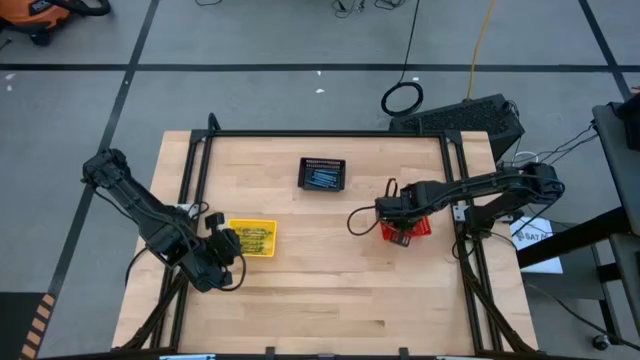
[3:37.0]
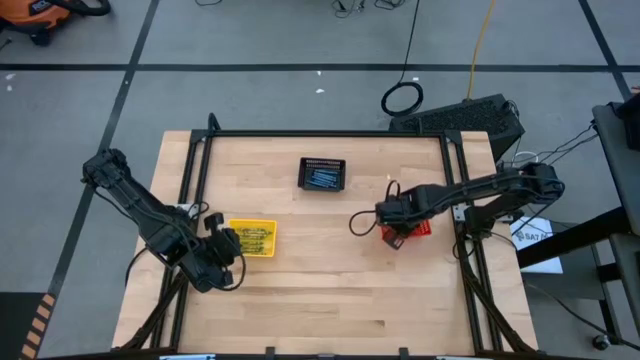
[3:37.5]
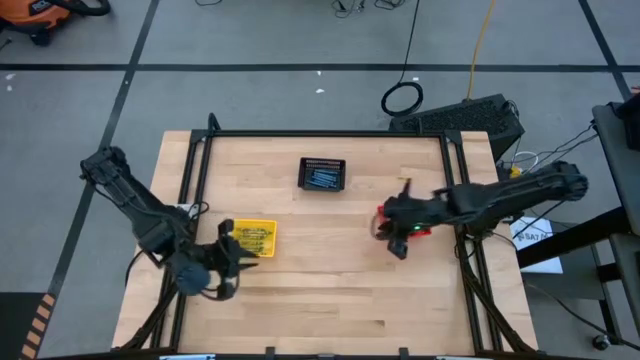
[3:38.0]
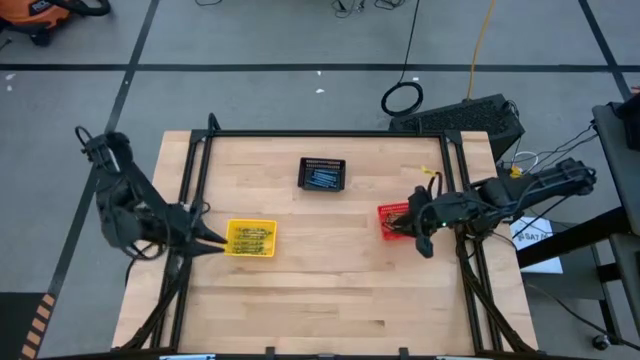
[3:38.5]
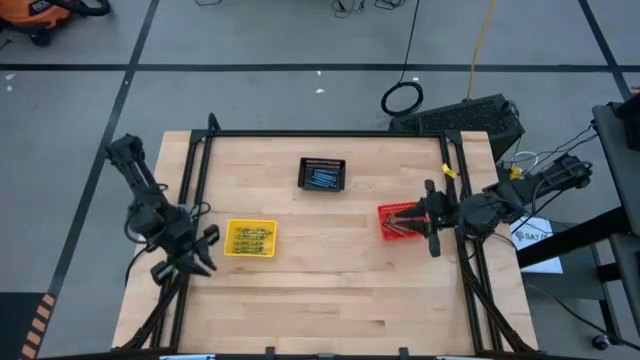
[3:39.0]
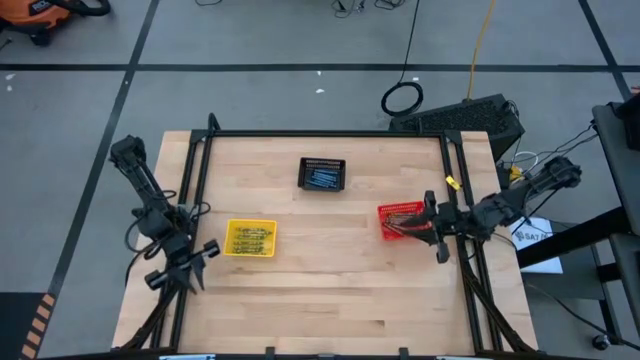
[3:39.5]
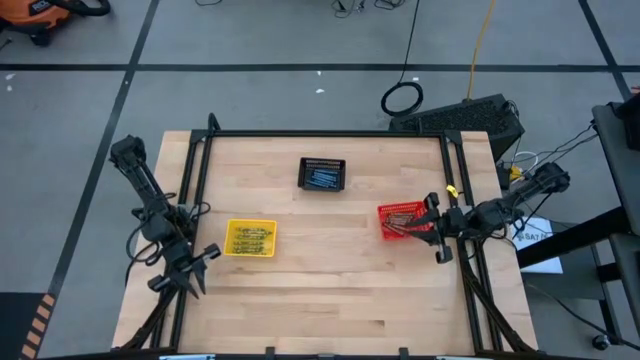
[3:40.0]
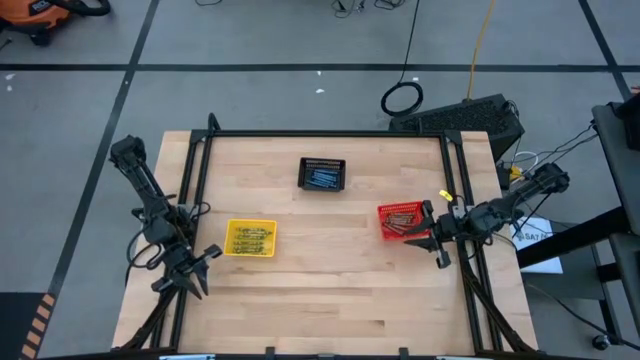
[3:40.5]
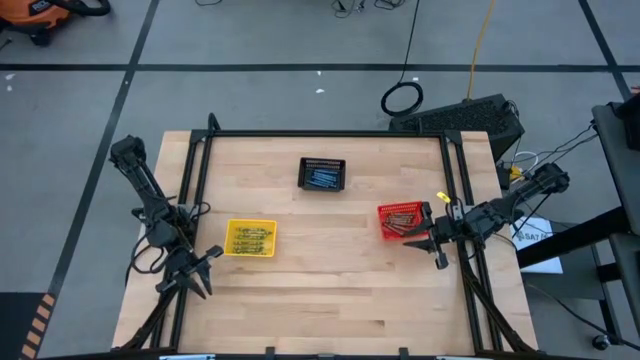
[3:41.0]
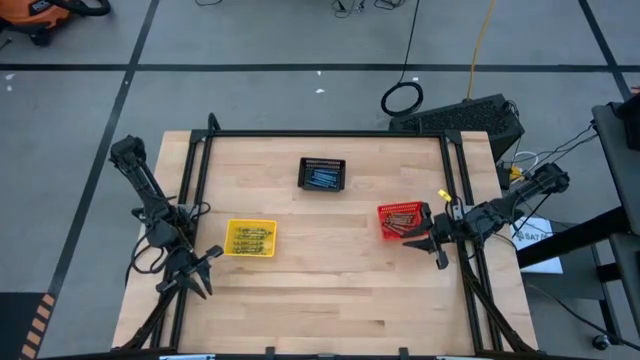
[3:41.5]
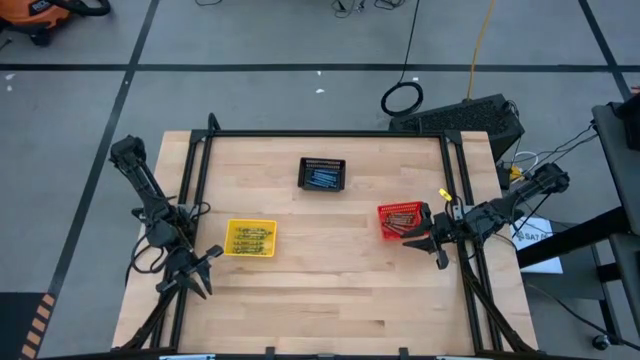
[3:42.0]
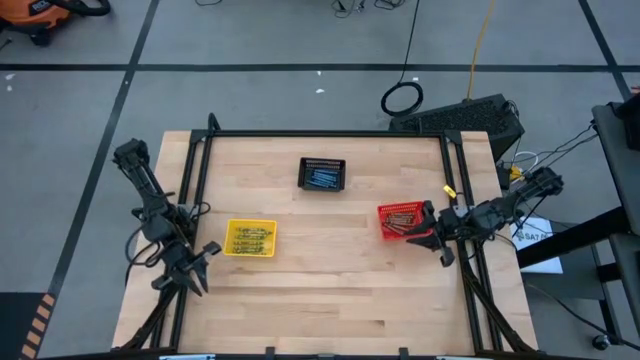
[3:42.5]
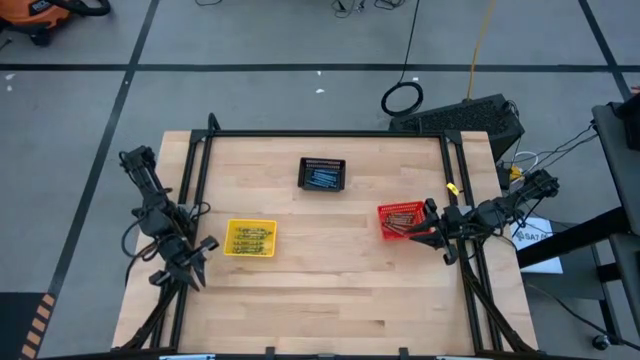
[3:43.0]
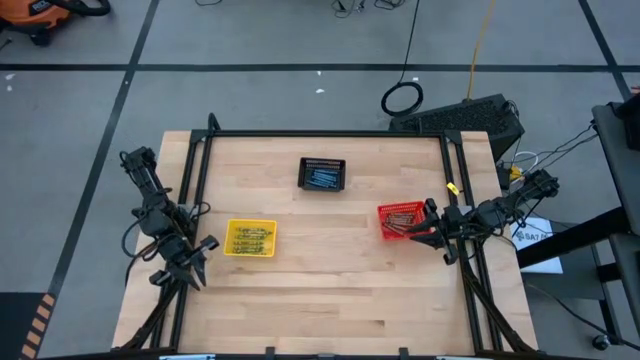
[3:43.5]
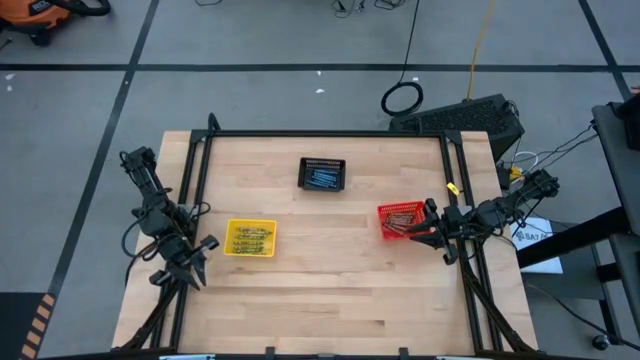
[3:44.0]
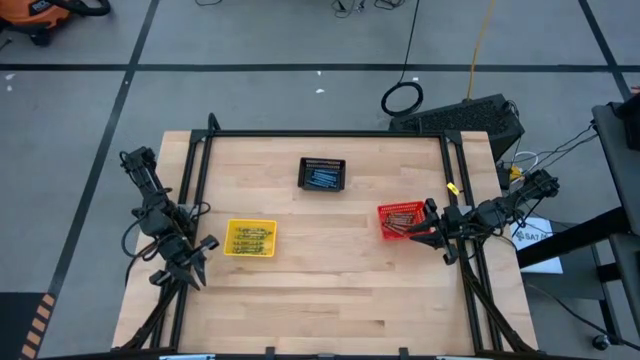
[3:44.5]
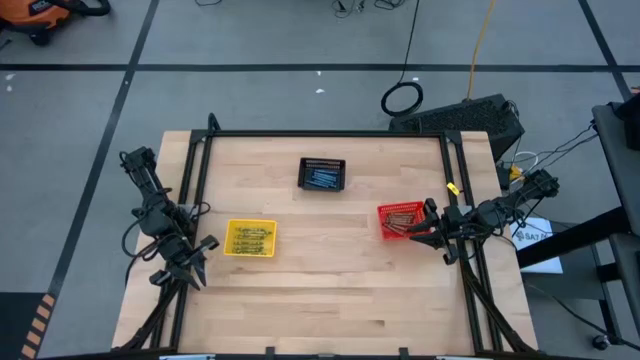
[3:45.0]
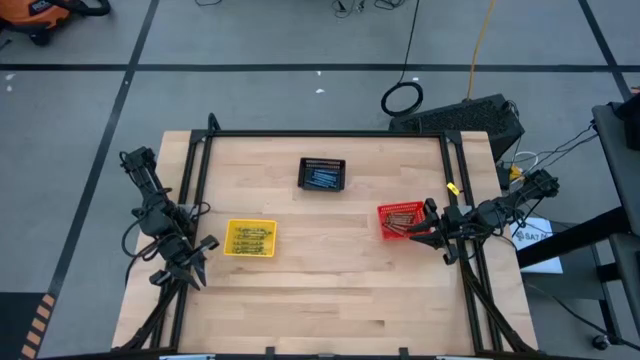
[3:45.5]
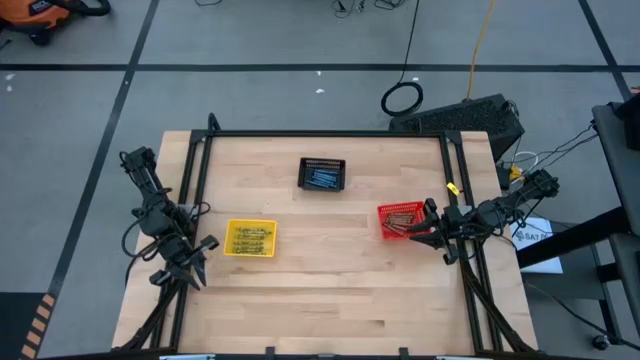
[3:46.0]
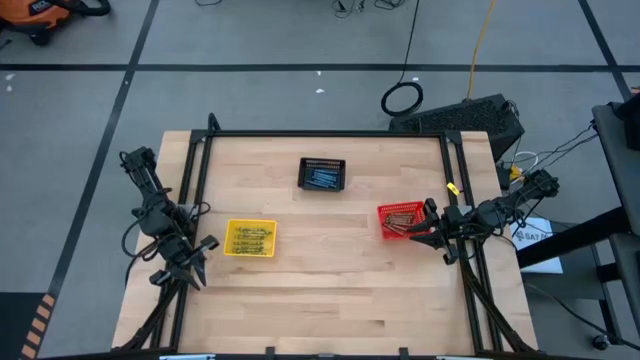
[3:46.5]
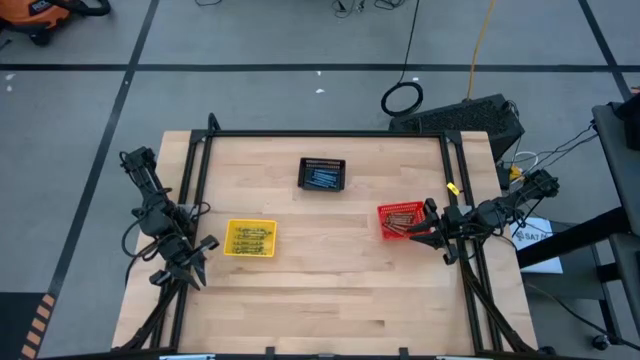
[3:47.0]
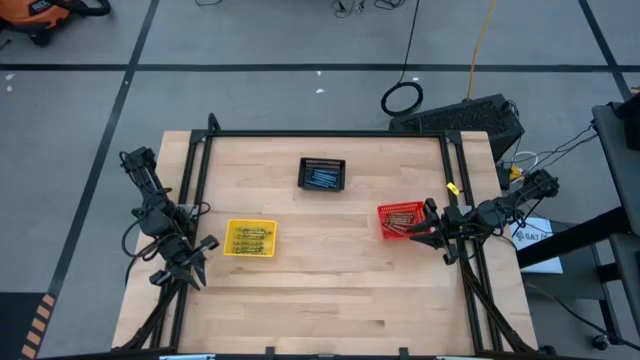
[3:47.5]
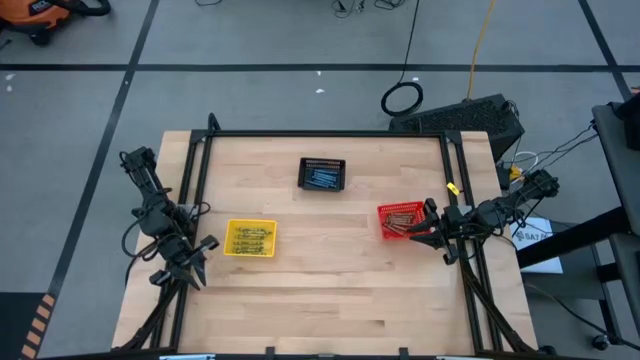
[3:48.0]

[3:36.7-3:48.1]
Task: Sort crayons
Return to Home Position

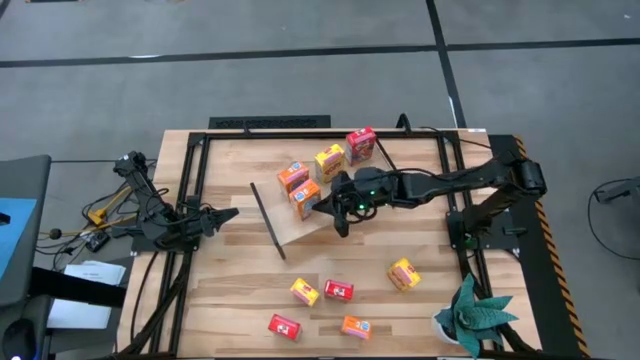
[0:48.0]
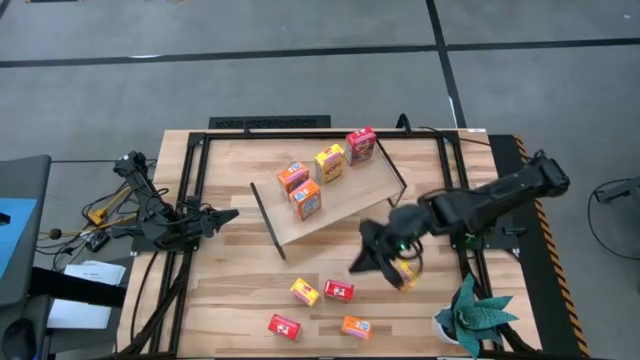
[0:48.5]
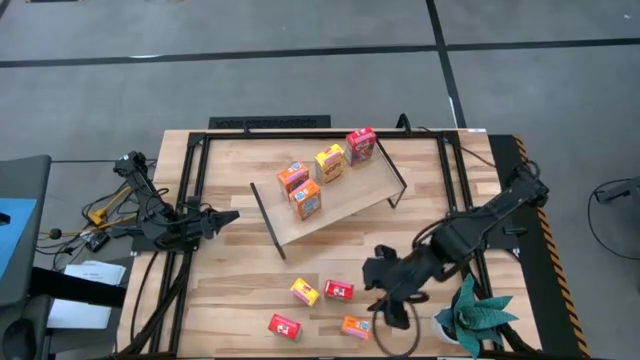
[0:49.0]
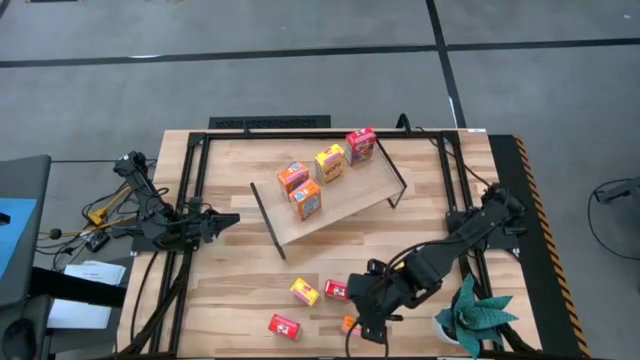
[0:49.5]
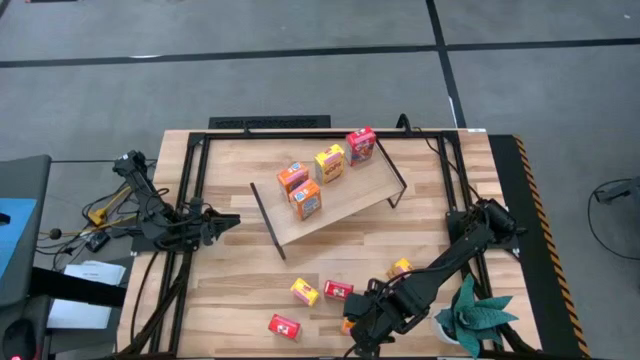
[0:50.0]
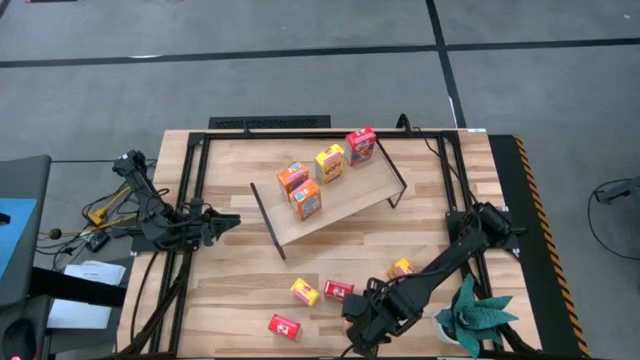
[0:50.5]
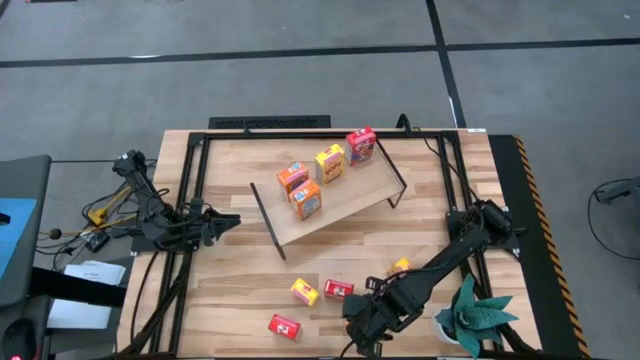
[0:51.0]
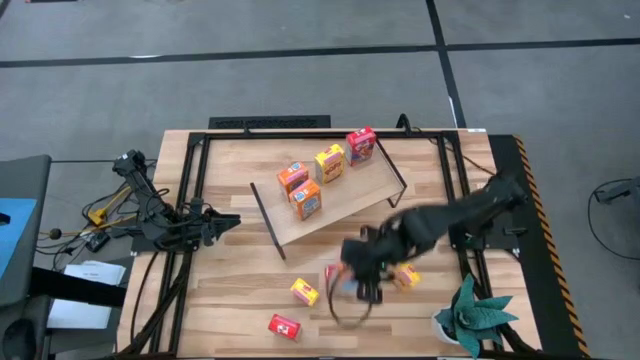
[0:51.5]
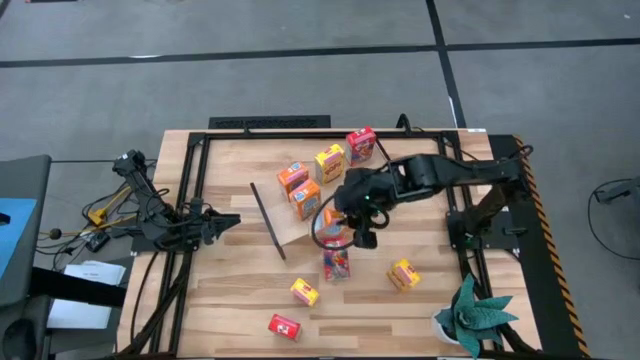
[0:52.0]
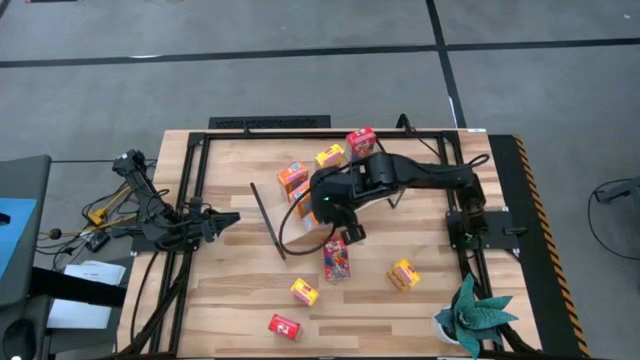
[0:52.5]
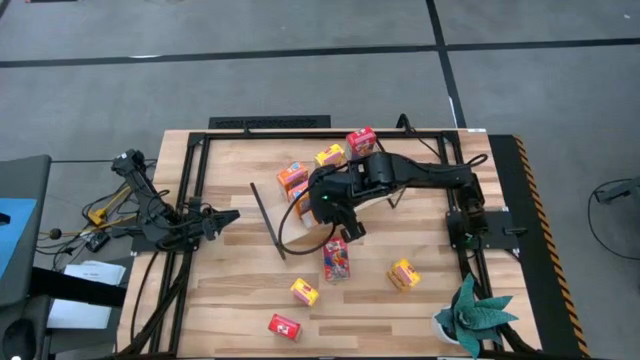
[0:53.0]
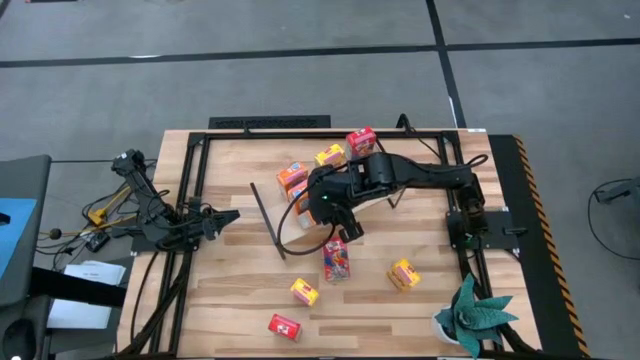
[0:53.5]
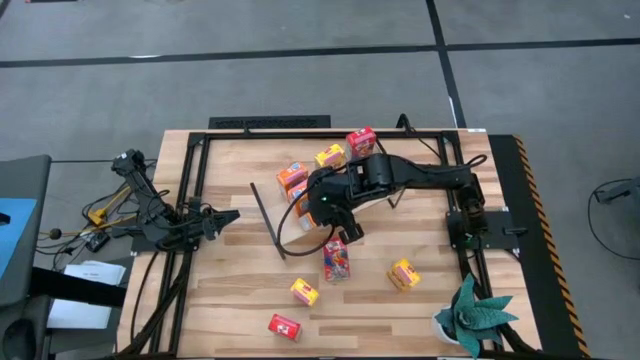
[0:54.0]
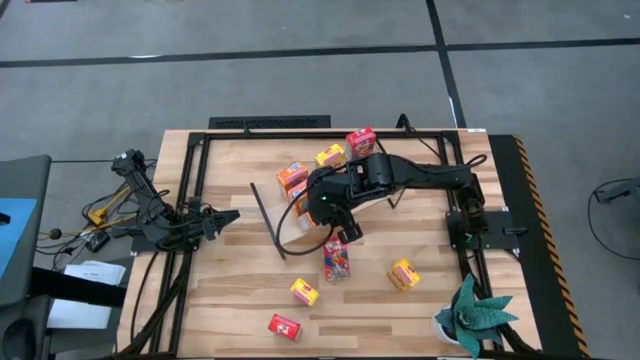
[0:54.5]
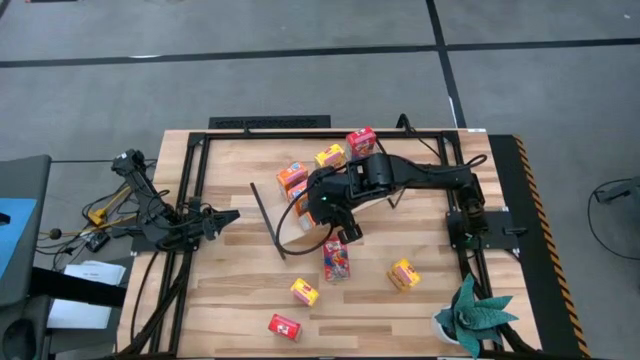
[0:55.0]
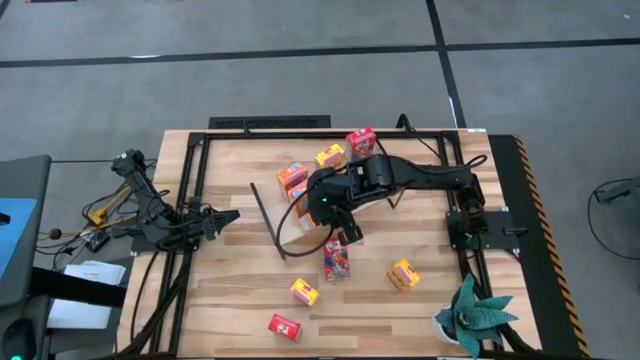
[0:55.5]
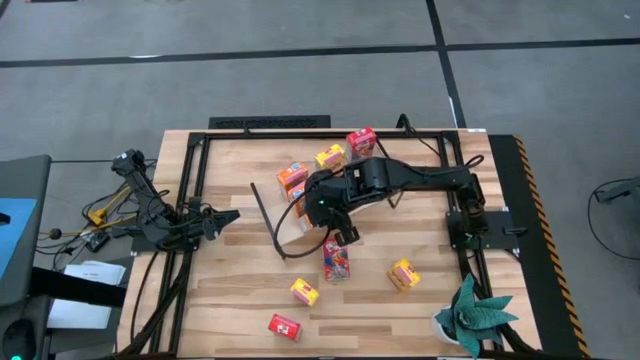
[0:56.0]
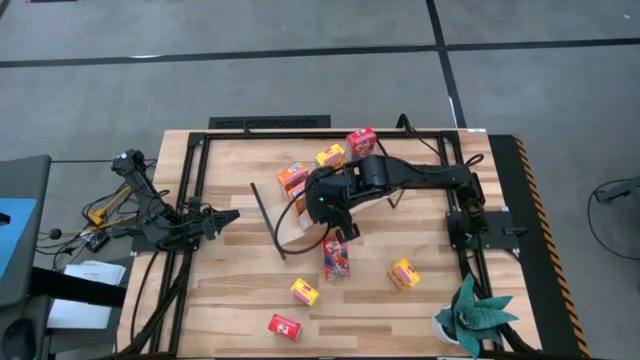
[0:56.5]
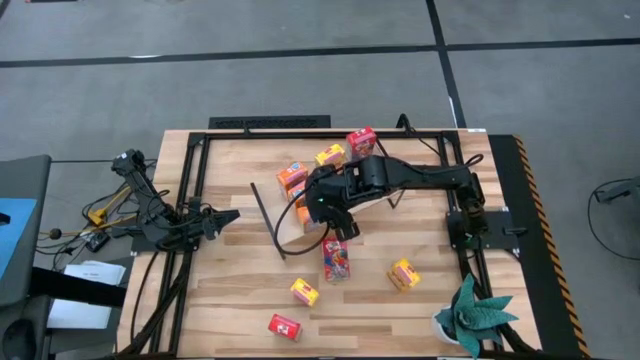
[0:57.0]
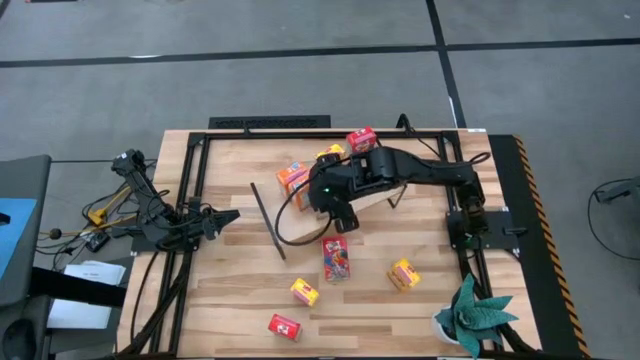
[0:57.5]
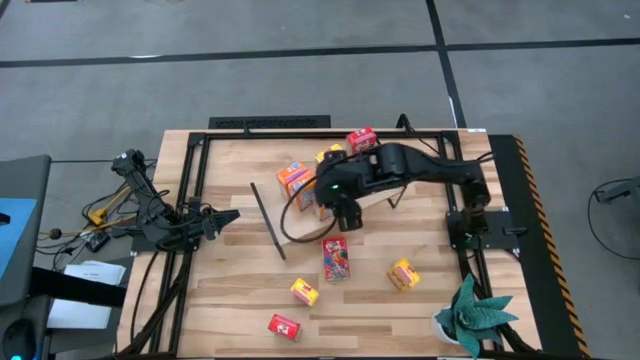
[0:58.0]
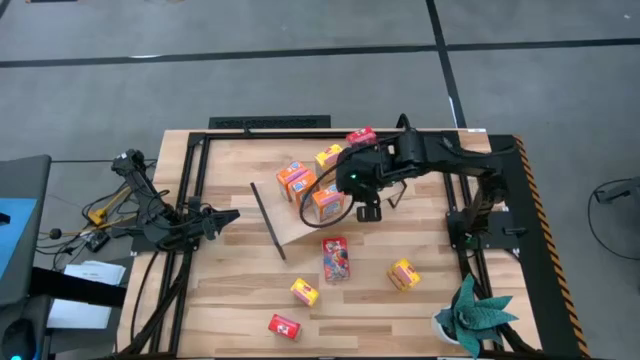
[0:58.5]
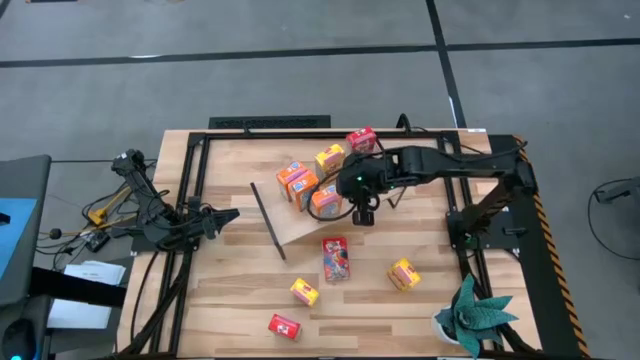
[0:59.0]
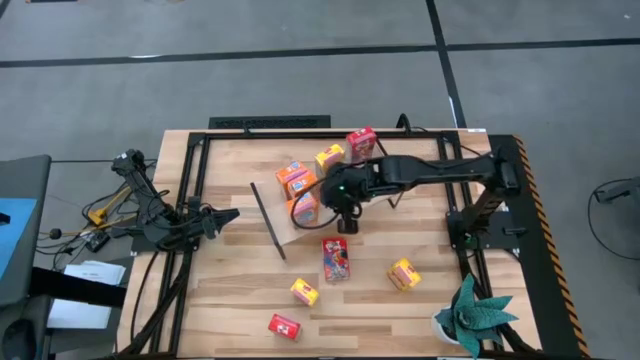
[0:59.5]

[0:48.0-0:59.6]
Task: Stack cereal on shelf
Put the orange cereal box on the shelf aligned with the other orange cereal box
